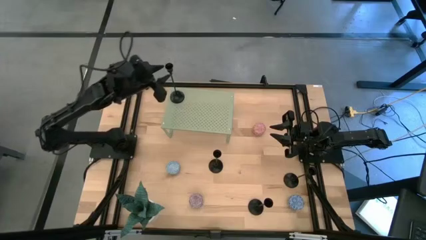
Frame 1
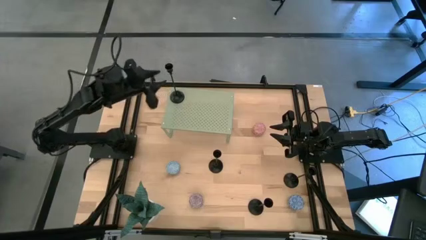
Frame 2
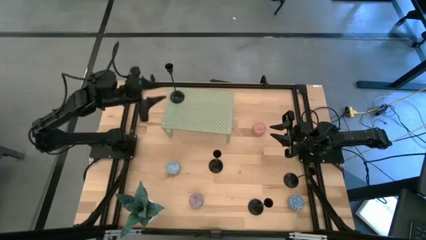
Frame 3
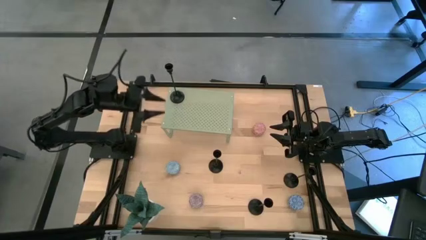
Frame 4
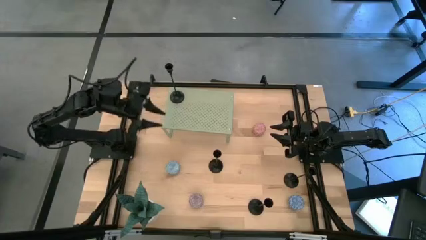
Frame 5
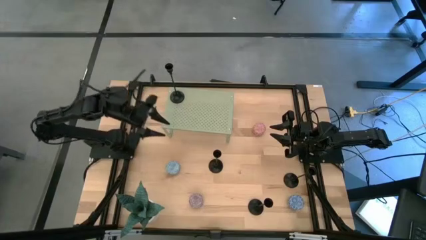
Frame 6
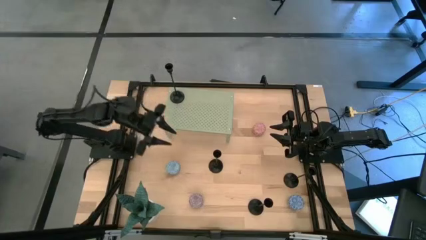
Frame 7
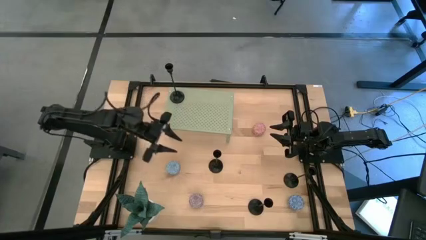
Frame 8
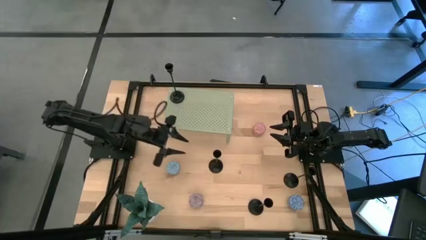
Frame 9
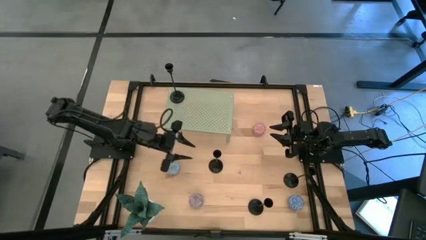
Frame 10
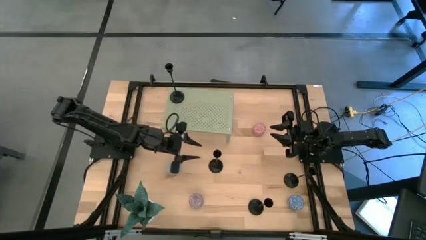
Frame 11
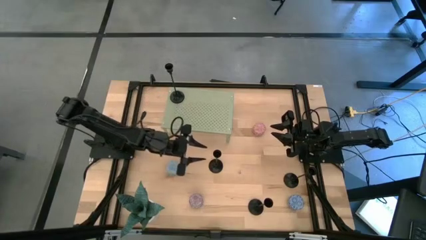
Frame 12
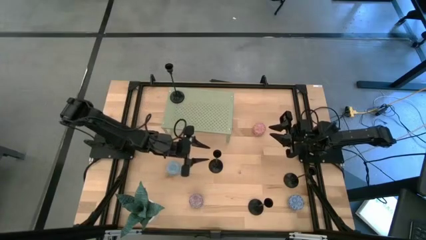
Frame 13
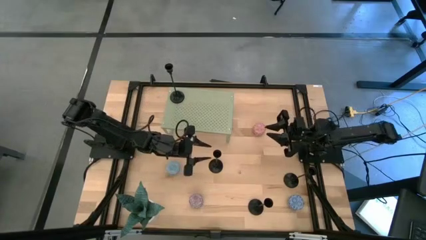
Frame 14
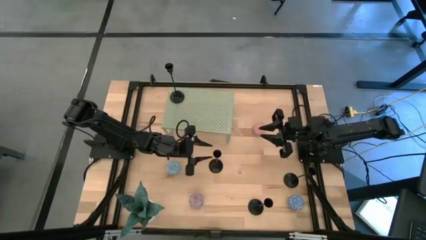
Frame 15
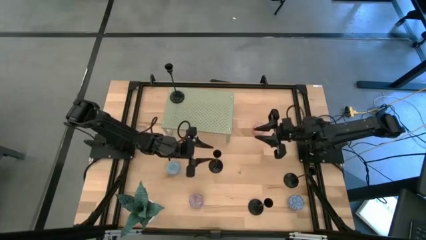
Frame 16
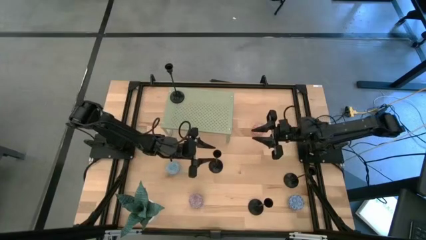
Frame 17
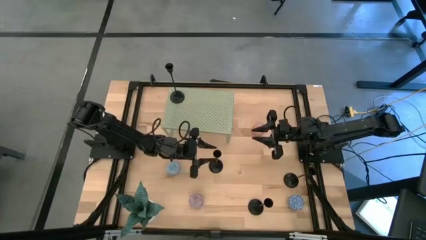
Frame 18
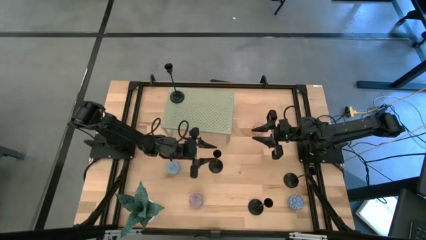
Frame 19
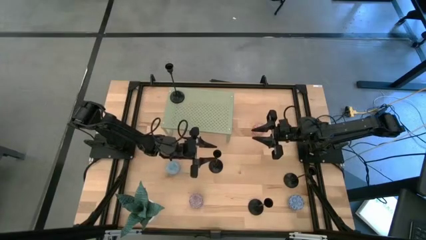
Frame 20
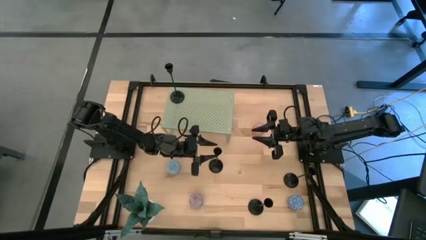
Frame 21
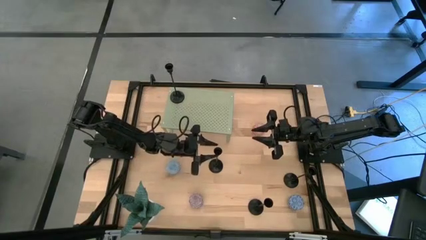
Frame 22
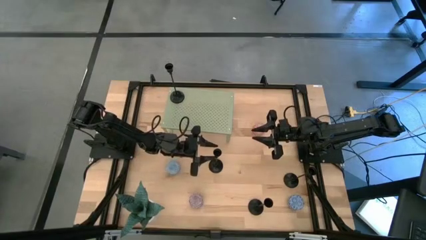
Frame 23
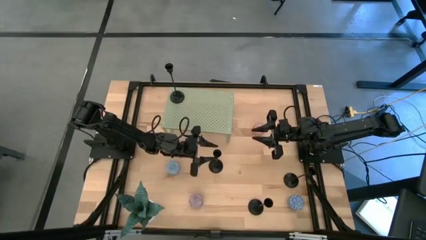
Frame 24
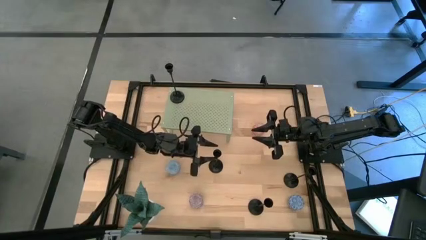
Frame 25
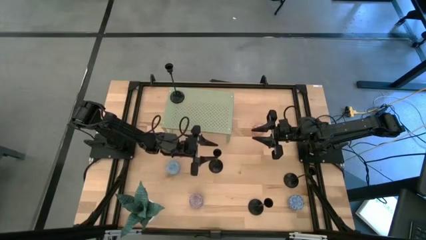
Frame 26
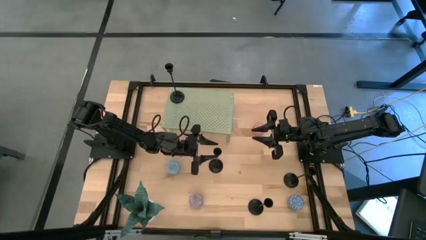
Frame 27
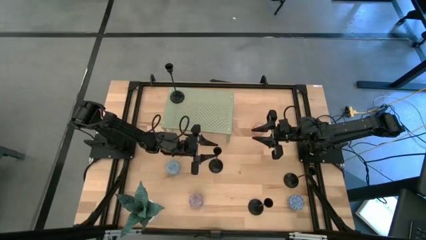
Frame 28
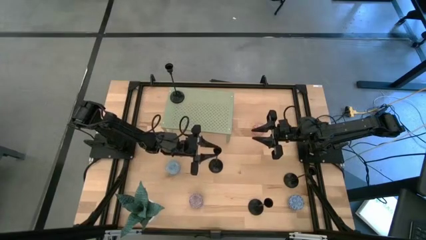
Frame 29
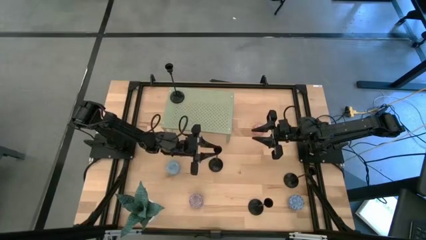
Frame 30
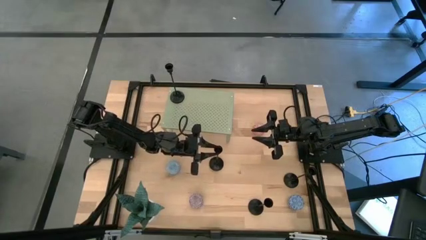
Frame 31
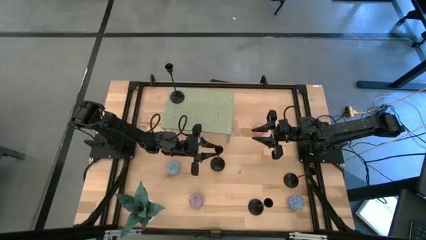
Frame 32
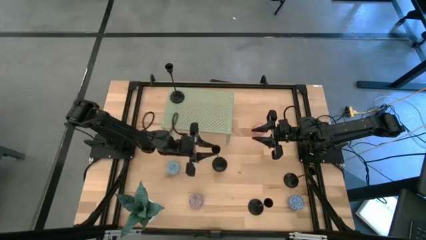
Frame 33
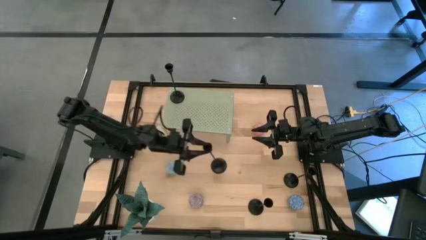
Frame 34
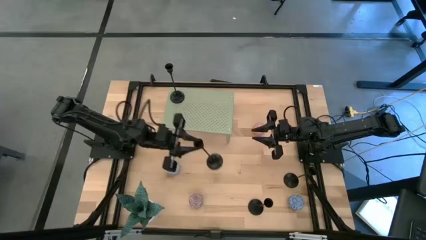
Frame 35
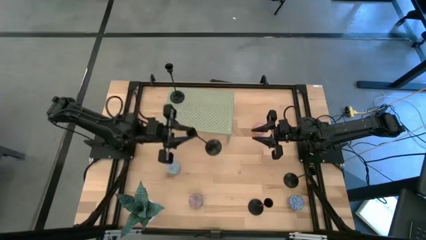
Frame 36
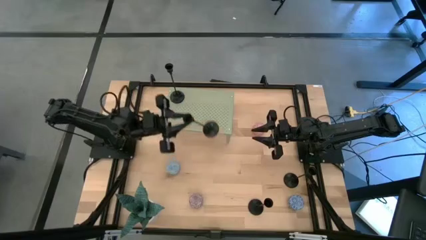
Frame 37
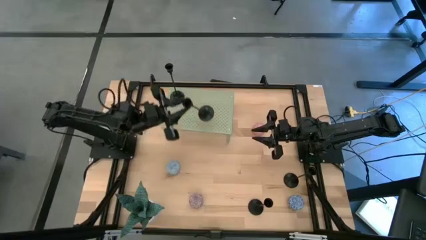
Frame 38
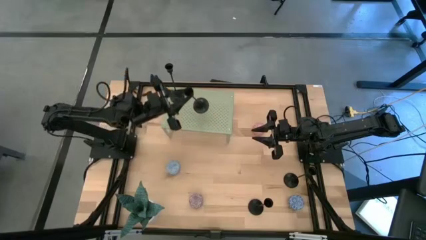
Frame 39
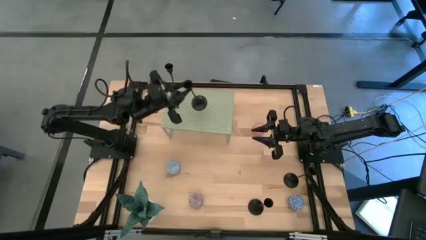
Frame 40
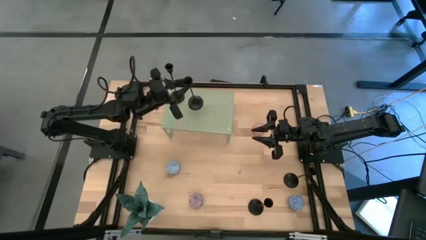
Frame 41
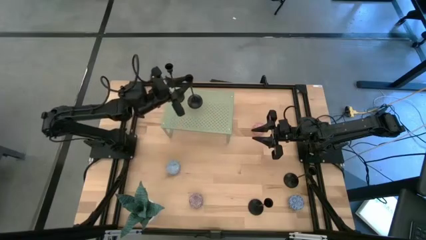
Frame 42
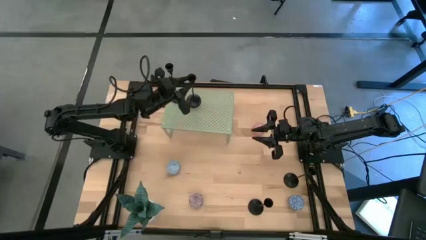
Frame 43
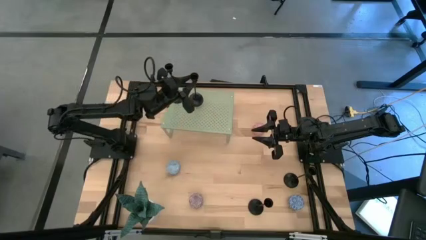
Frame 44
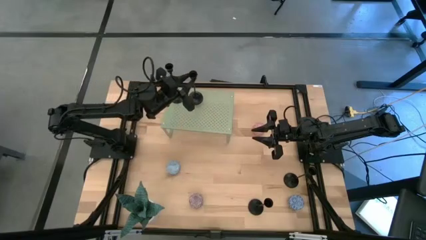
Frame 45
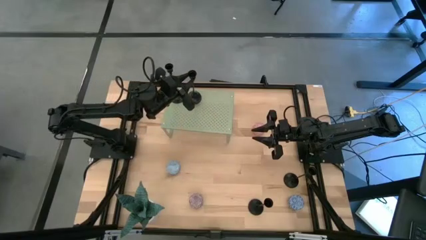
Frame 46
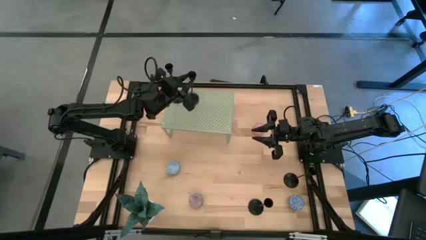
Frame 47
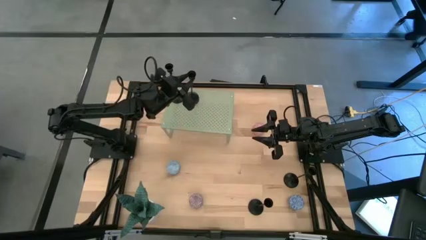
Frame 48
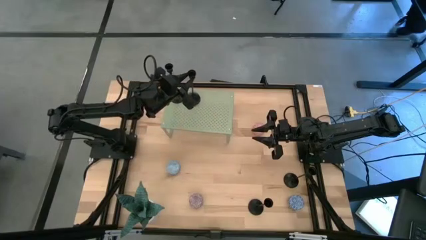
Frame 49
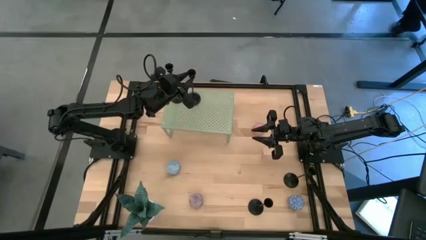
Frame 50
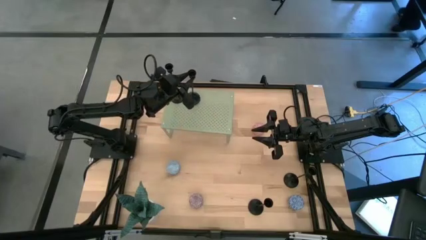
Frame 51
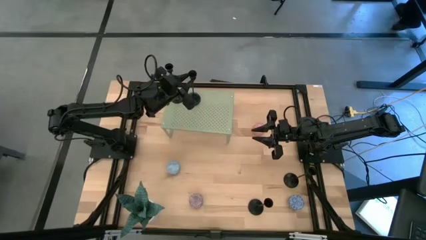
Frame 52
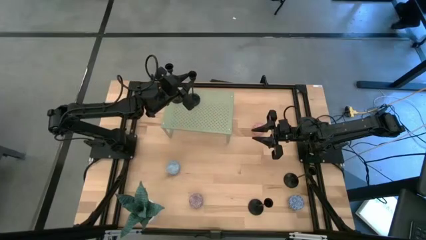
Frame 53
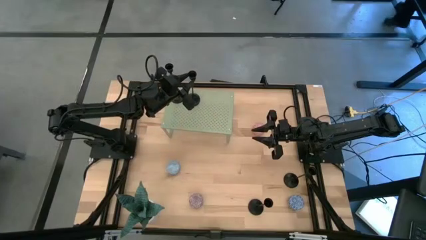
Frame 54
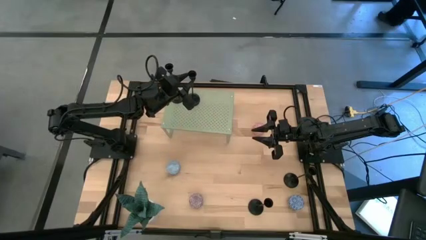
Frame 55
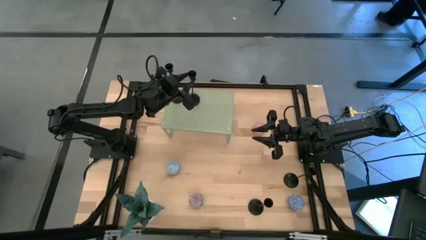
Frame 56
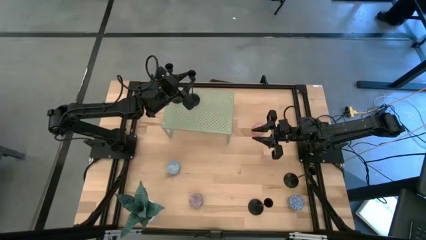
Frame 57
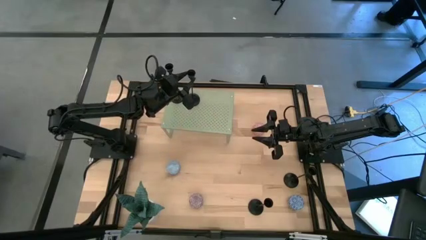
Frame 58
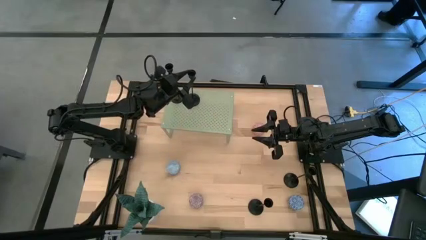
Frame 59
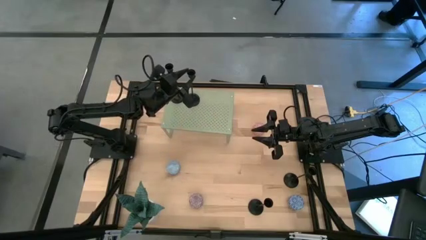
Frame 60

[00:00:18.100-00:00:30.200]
Task: Pick & Place candle stick holders
Put the top left black candle holder on the shelf aligned with the other black candle holder
